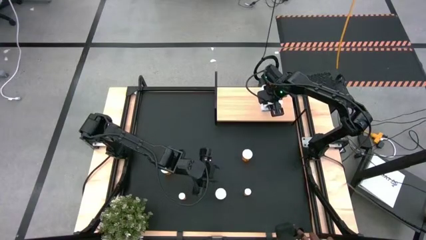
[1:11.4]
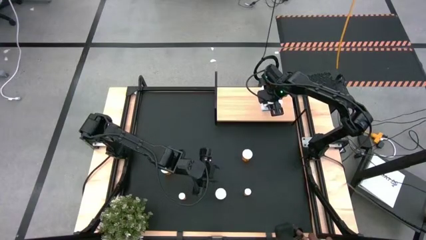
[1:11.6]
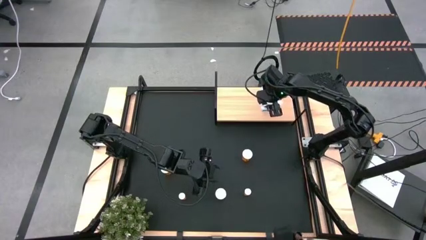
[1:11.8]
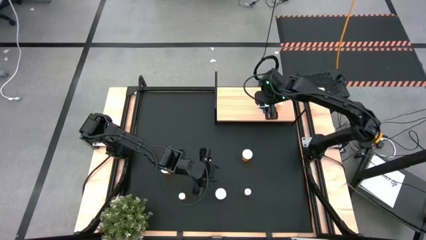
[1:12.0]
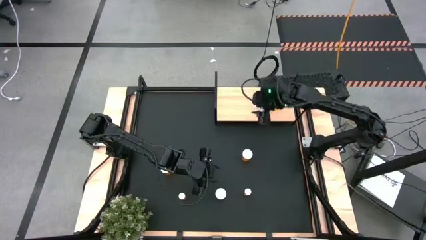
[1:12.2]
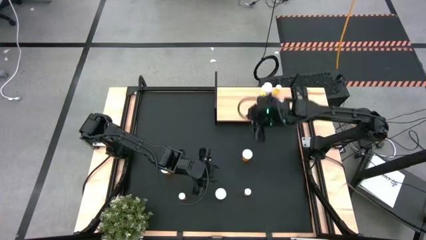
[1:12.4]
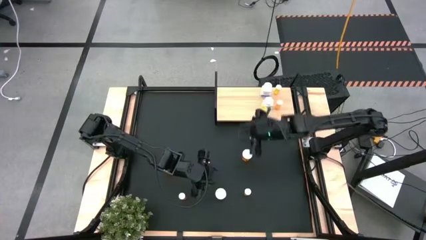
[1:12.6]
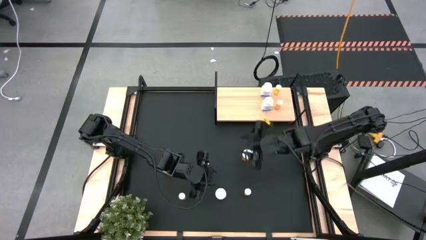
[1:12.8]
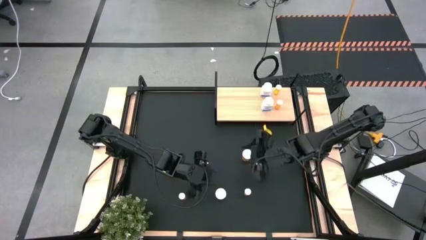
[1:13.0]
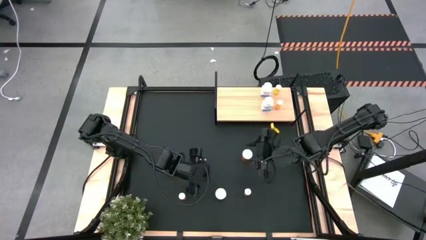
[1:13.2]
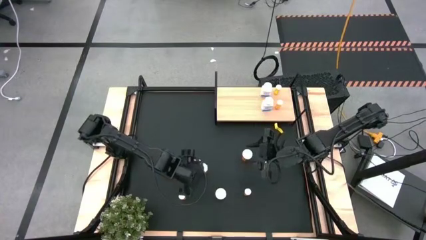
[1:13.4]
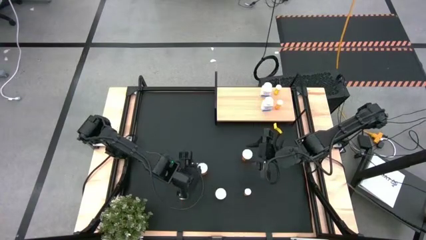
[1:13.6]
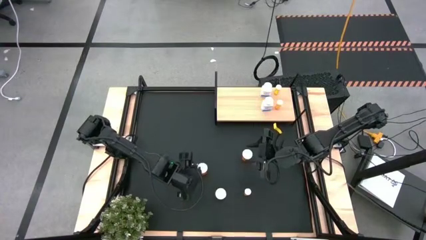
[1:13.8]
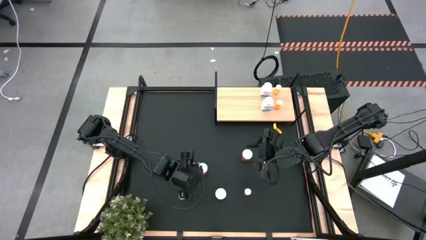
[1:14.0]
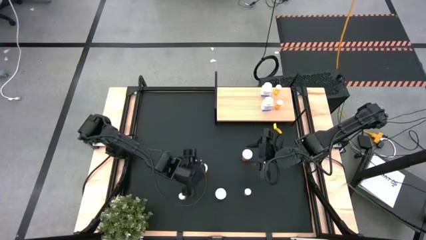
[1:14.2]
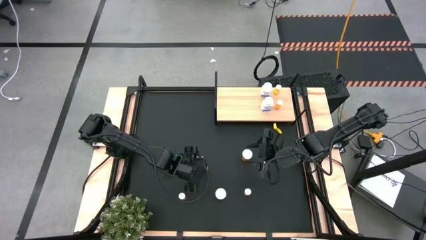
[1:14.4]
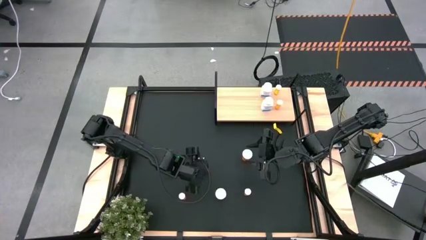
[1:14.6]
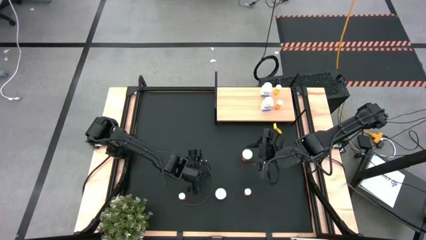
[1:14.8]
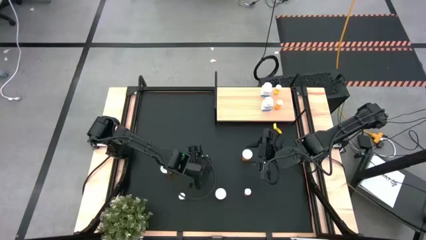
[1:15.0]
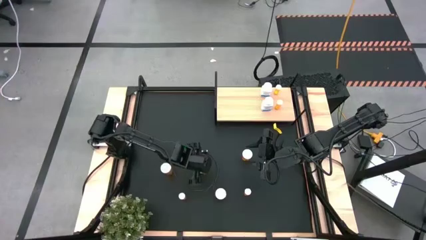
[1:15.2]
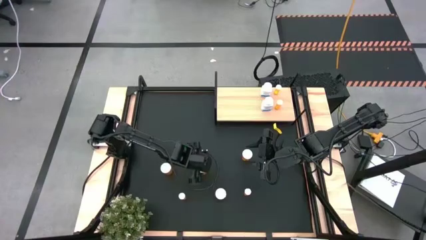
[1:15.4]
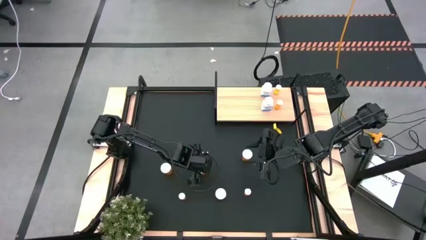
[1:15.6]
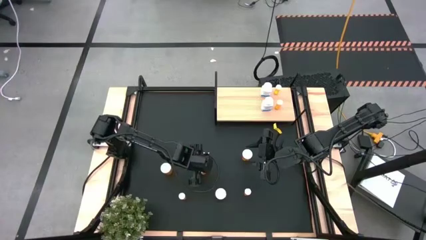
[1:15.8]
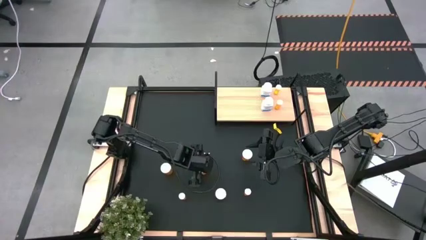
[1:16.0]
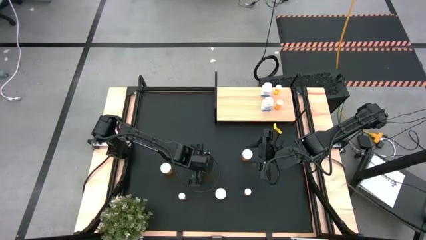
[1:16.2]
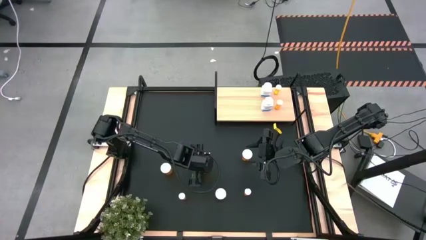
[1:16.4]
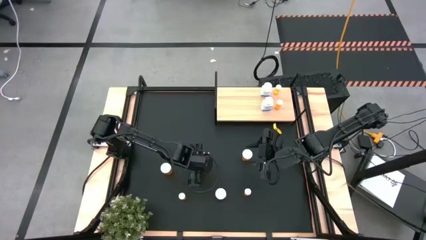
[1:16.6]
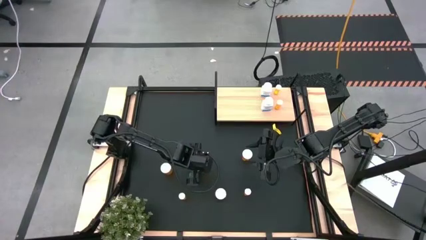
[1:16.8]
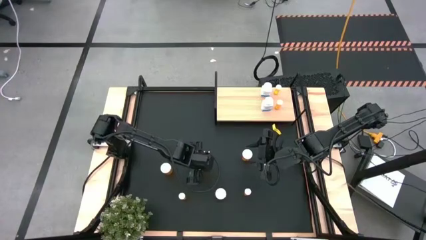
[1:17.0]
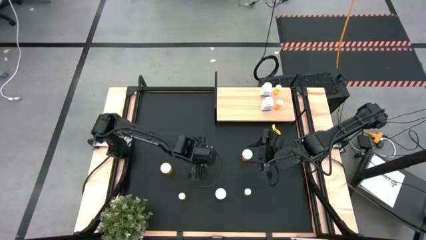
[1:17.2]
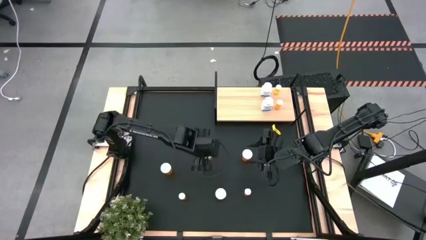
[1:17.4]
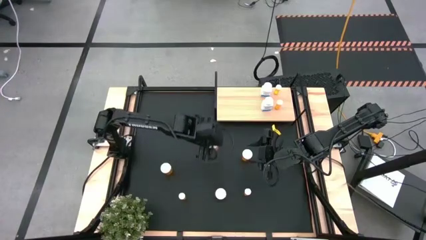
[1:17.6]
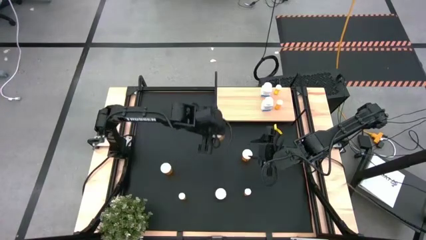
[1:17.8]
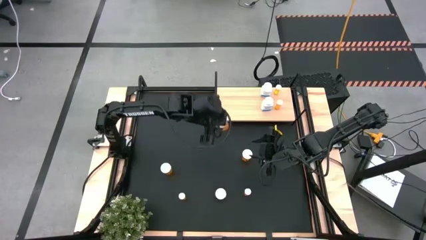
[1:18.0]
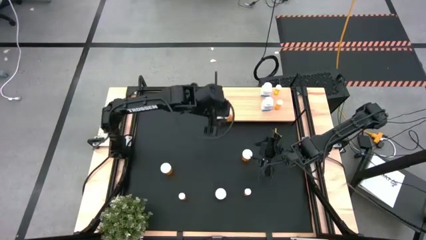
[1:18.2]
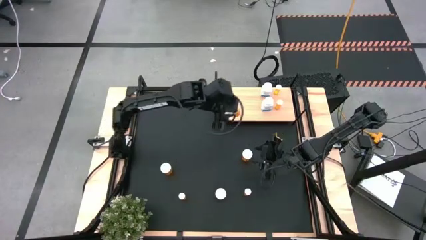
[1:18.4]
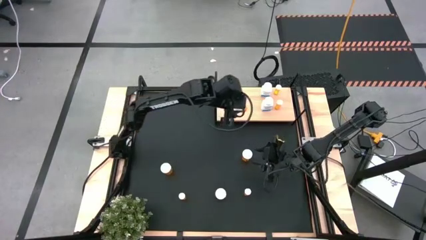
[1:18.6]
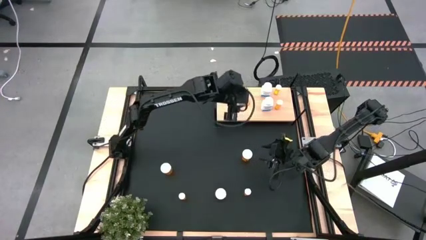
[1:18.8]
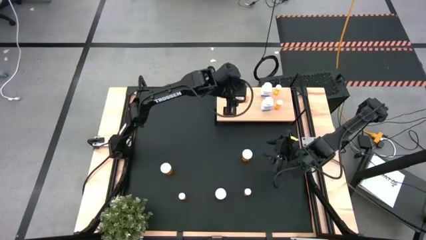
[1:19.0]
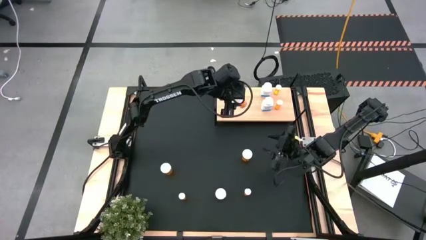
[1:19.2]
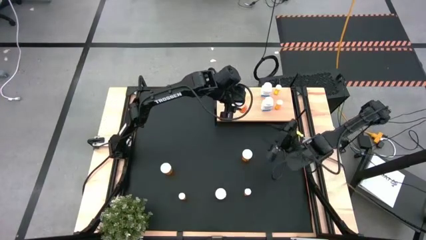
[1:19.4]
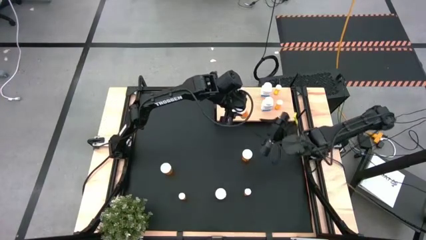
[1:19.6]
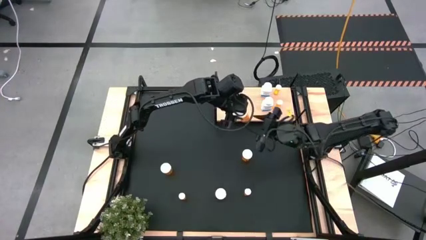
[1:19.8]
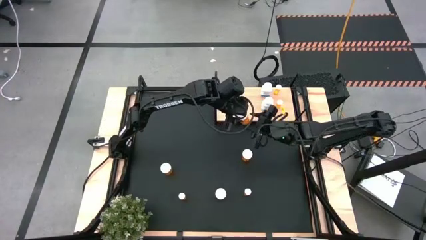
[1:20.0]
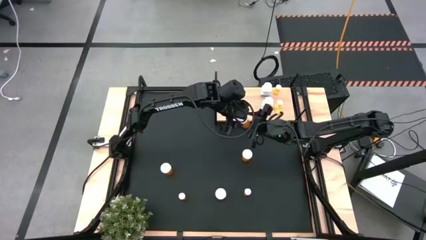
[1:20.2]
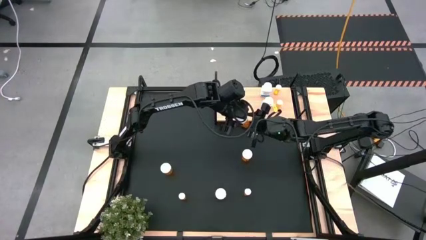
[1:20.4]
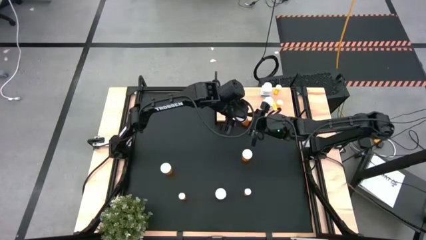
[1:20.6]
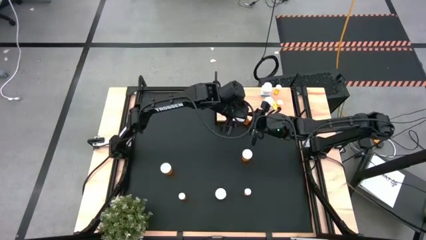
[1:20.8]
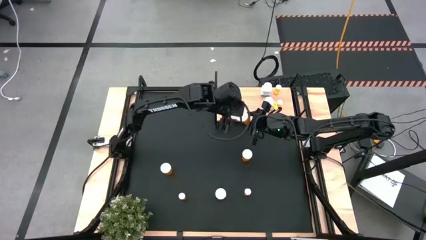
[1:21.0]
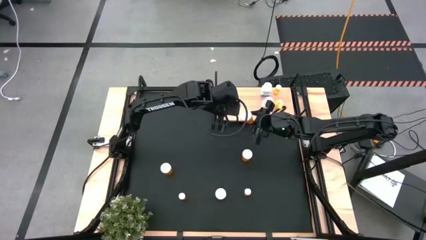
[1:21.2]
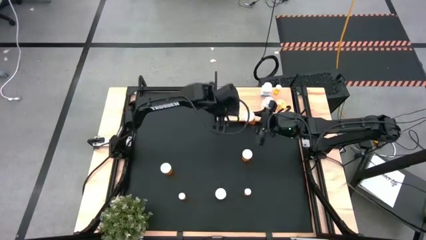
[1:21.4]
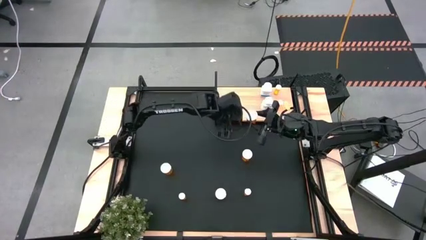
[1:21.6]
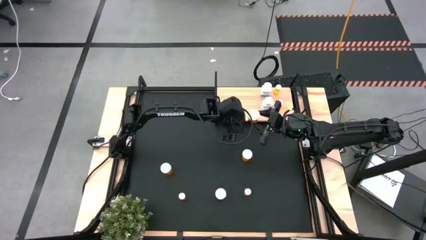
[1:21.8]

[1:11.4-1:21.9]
Task: Pick and place medicine bottles onto shelf by color
Put the large orange pill bottle on the shelf

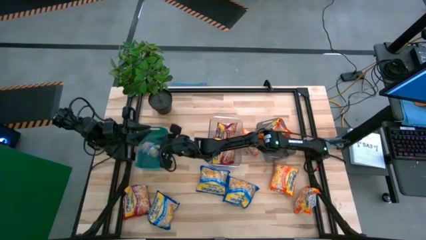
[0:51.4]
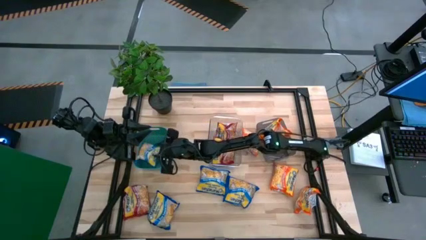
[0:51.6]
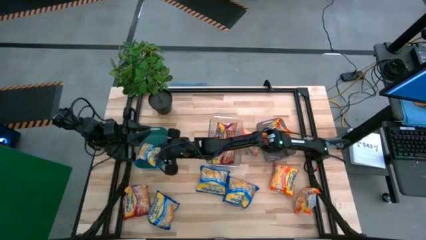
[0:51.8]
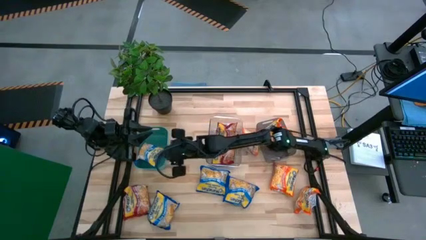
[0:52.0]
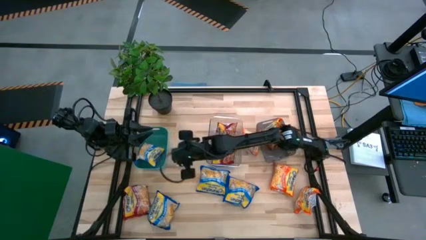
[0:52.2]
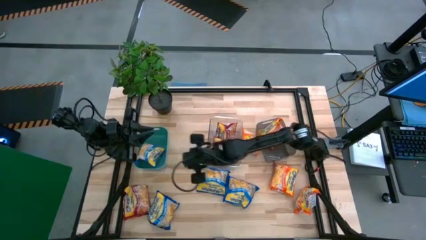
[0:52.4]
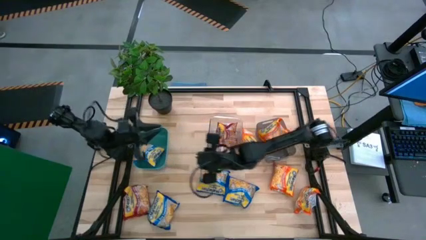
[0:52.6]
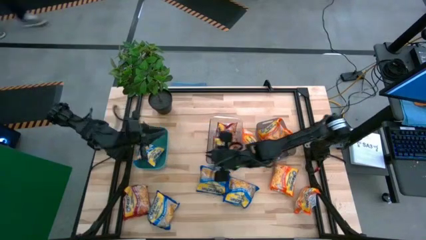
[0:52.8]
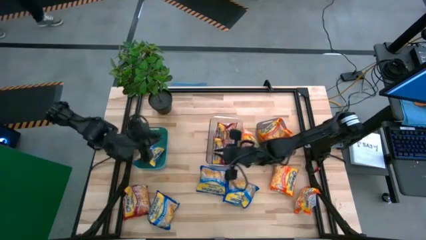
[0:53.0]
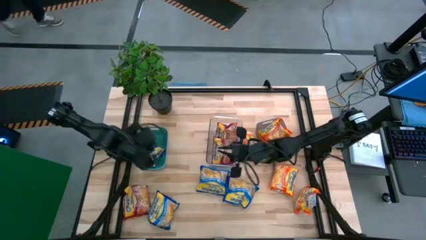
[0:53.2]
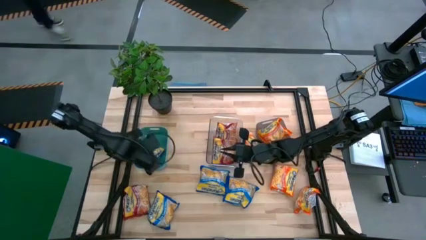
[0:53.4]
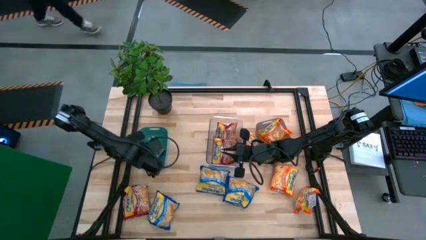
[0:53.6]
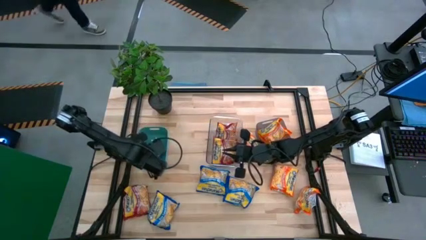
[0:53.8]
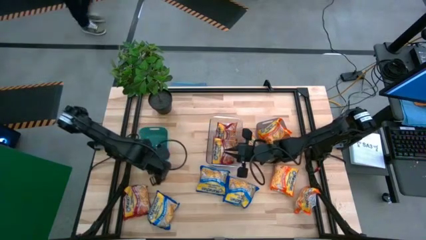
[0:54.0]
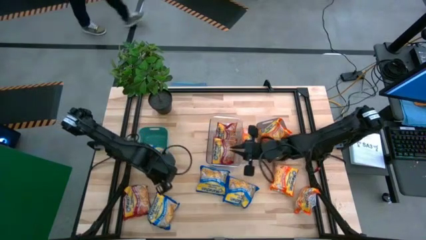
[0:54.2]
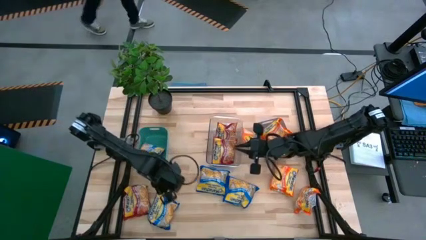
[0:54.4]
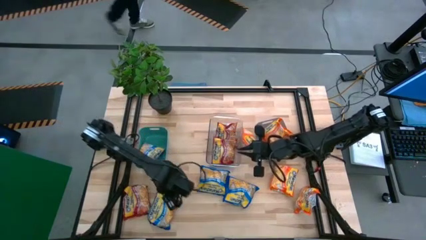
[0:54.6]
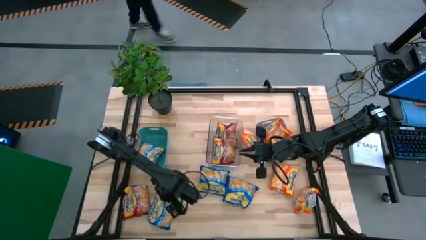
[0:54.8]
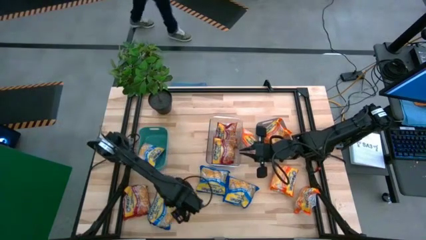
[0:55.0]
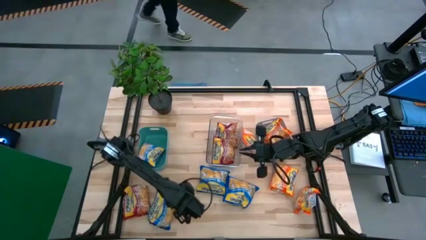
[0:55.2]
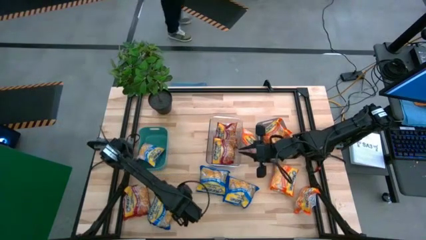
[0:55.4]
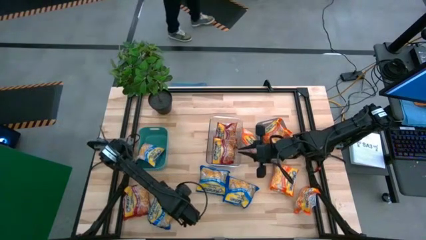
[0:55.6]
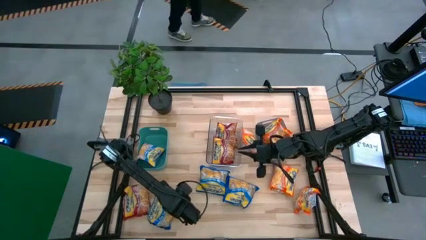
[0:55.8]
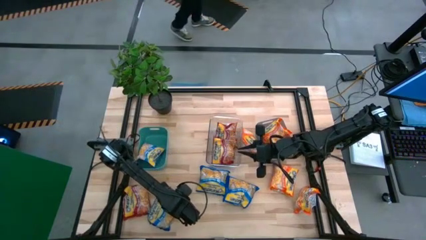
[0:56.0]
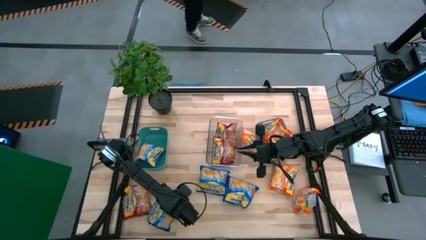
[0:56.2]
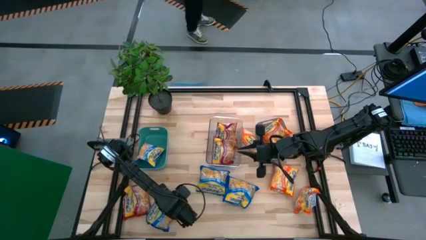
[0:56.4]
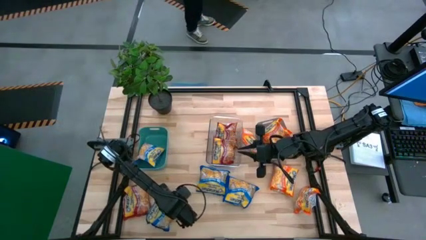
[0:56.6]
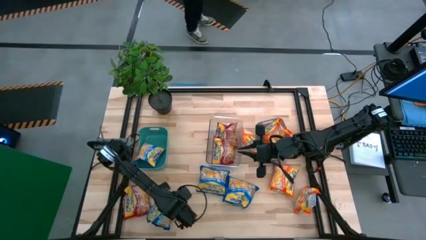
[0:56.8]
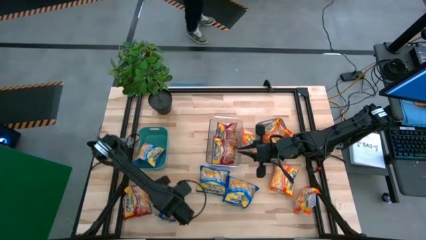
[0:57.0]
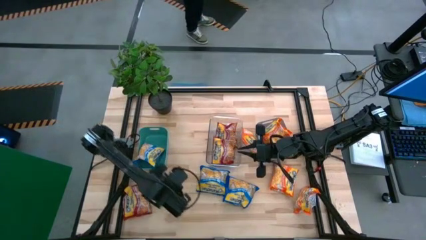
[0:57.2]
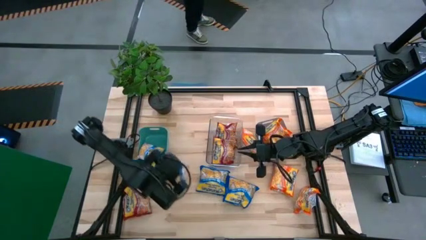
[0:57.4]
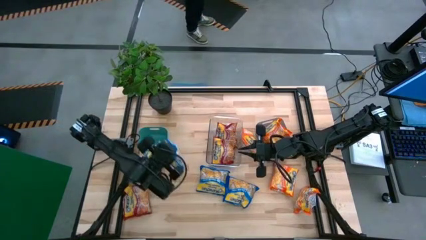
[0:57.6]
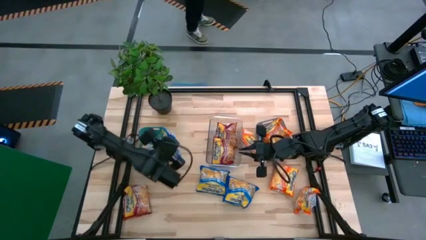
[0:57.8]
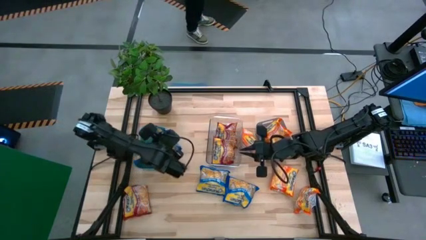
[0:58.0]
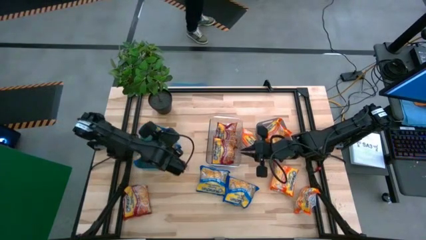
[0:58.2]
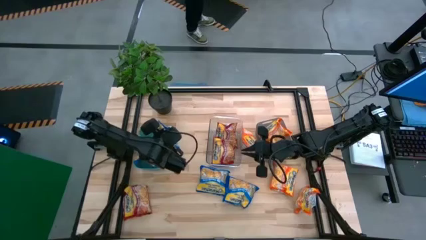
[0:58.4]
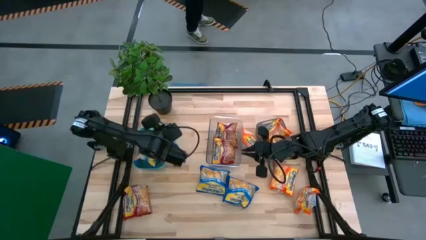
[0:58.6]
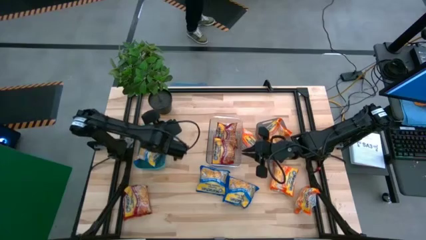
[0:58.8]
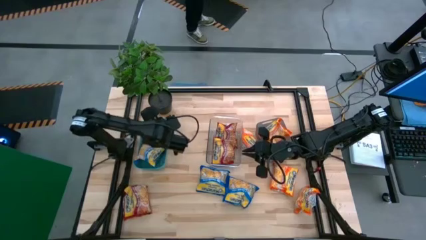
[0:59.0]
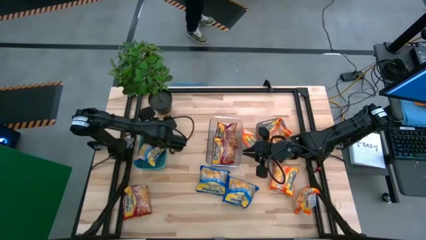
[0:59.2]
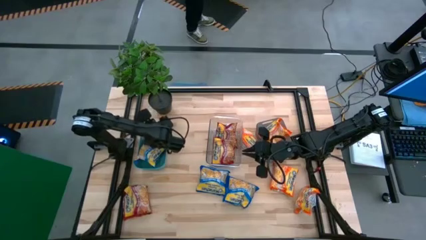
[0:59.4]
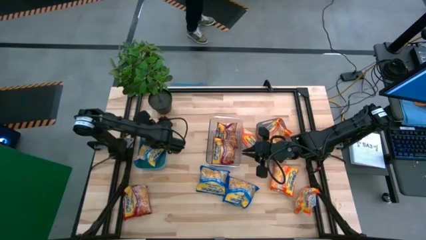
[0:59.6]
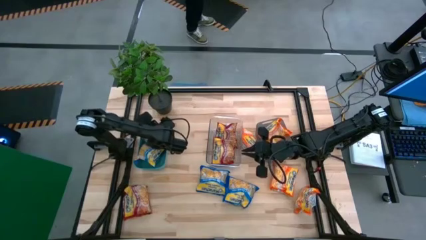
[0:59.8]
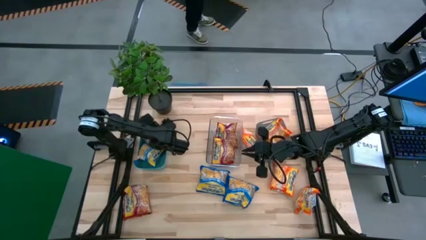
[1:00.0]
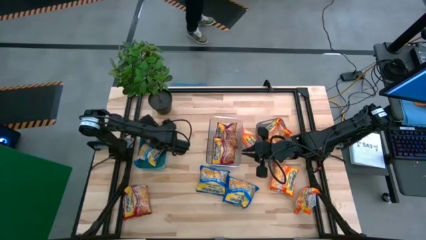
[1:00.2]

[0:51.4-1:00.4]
Task: Sort Maruchan noodles
Put the blue noodle pack into the green bin
